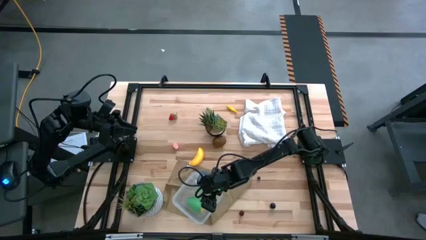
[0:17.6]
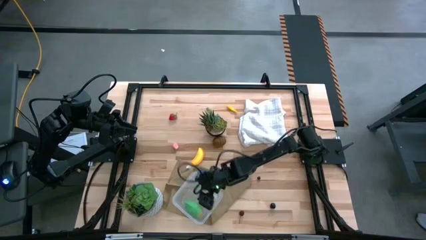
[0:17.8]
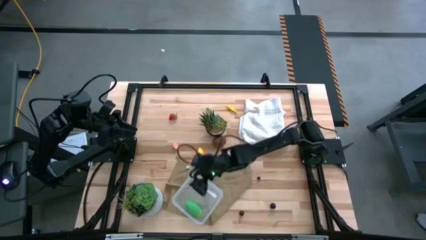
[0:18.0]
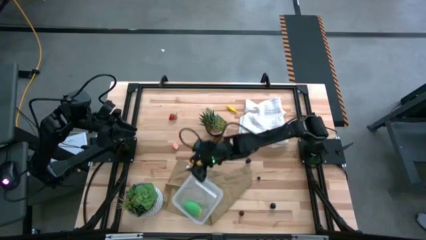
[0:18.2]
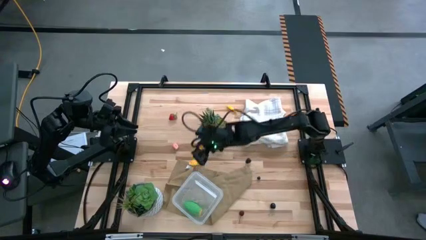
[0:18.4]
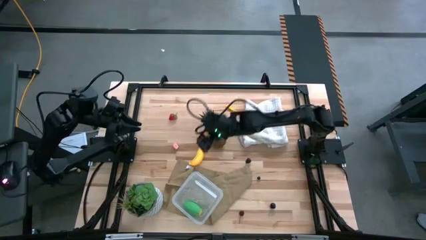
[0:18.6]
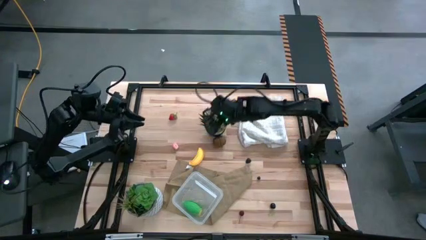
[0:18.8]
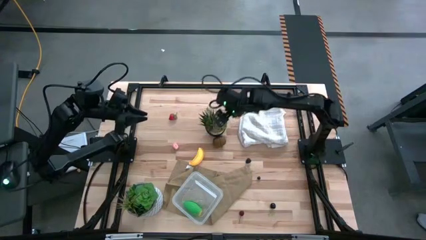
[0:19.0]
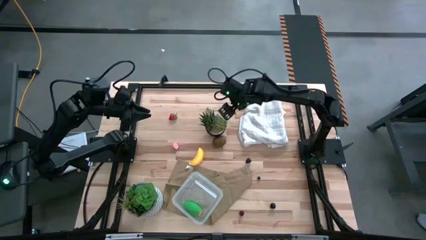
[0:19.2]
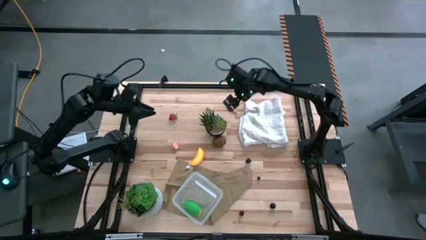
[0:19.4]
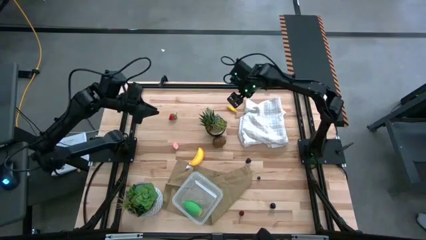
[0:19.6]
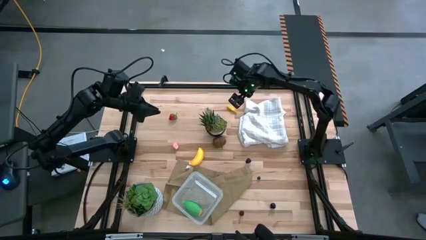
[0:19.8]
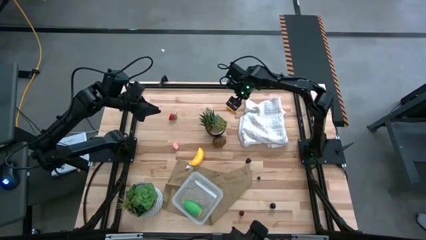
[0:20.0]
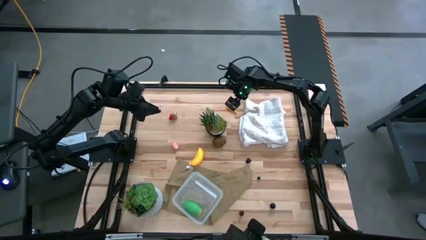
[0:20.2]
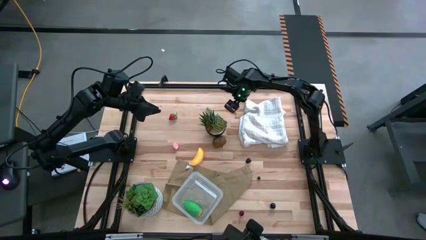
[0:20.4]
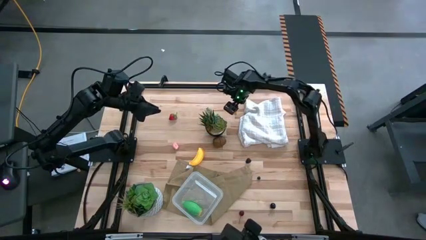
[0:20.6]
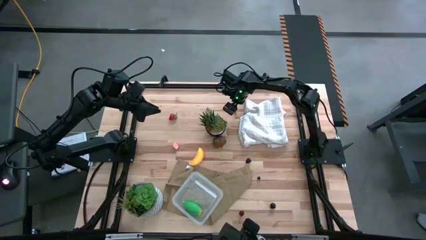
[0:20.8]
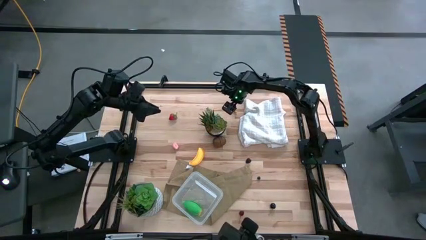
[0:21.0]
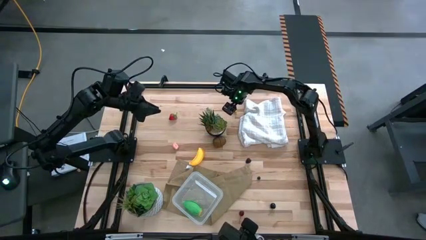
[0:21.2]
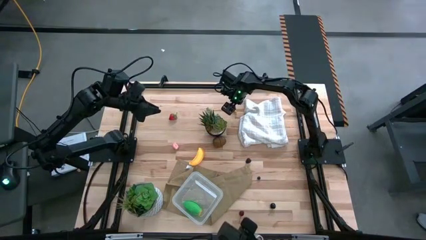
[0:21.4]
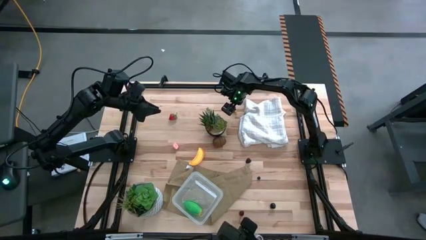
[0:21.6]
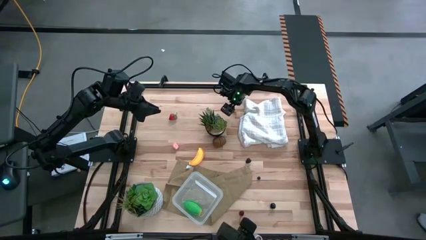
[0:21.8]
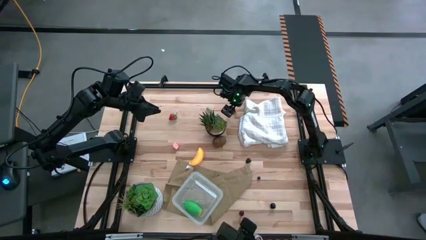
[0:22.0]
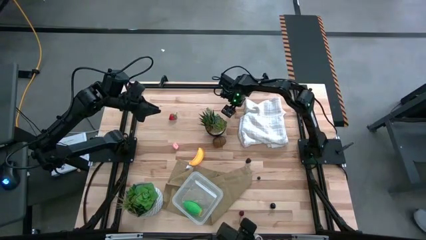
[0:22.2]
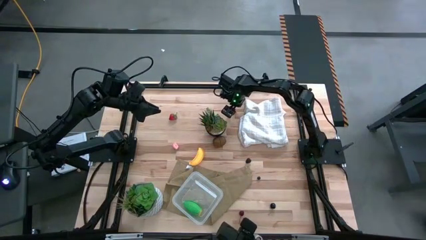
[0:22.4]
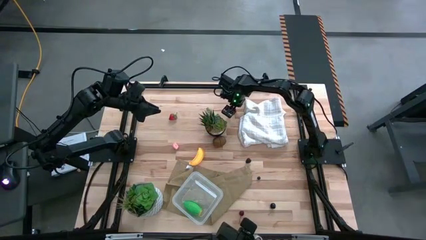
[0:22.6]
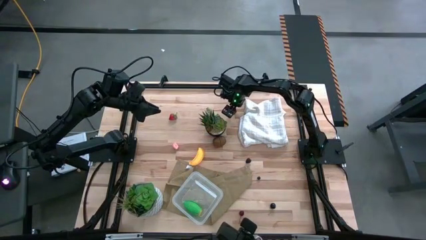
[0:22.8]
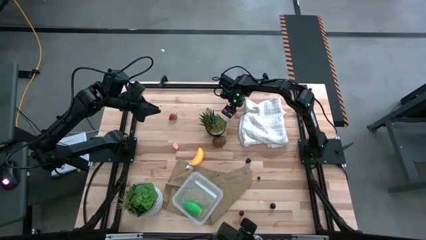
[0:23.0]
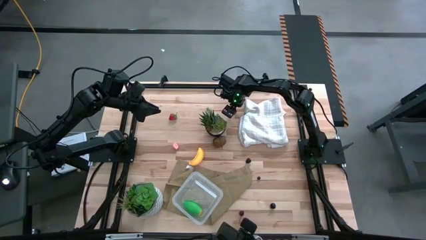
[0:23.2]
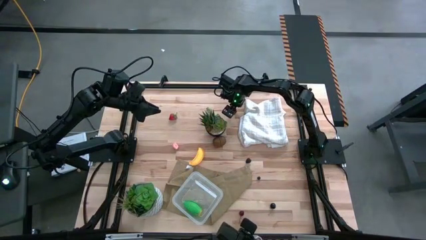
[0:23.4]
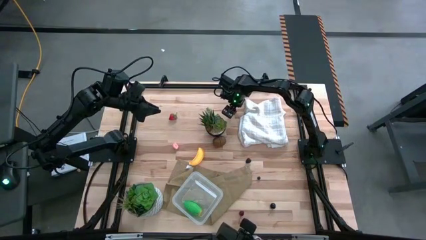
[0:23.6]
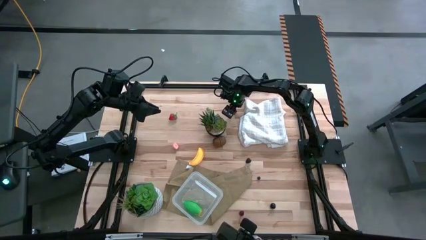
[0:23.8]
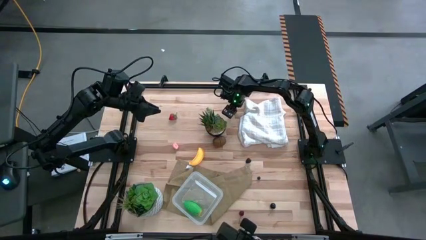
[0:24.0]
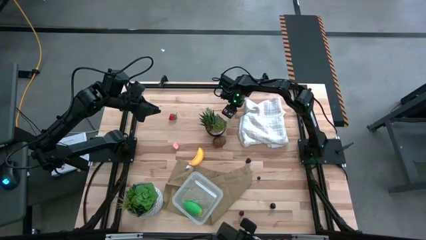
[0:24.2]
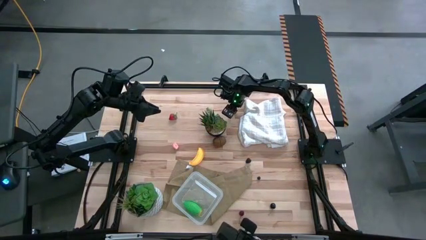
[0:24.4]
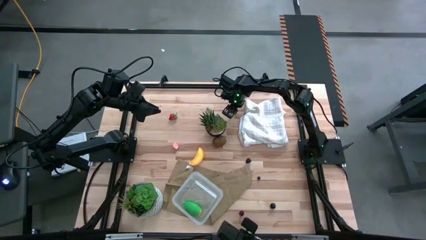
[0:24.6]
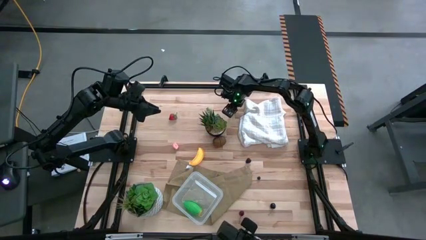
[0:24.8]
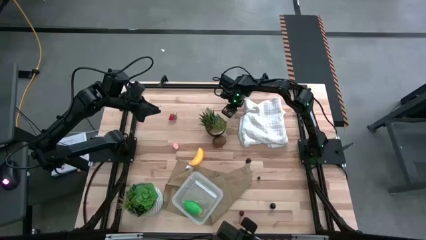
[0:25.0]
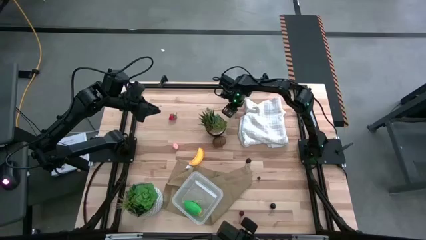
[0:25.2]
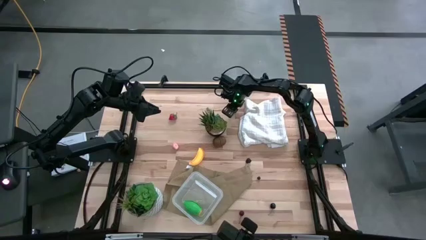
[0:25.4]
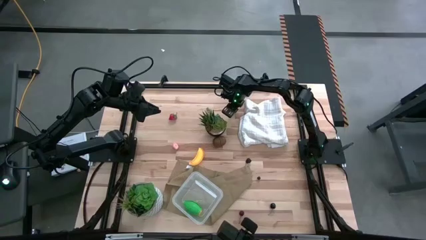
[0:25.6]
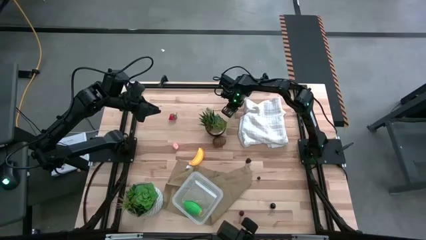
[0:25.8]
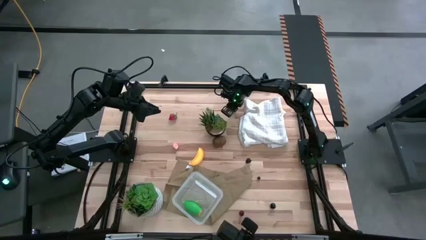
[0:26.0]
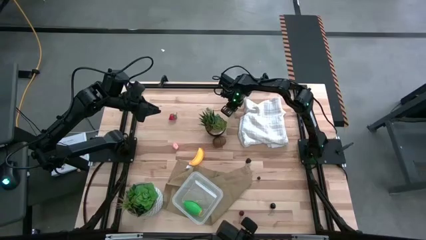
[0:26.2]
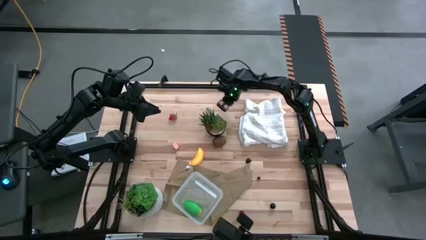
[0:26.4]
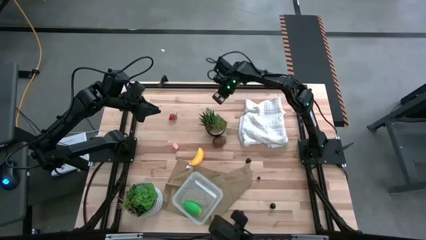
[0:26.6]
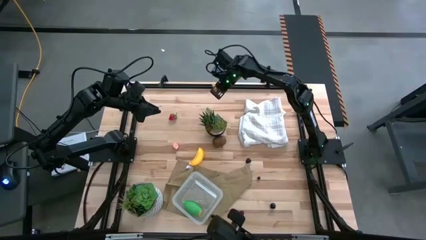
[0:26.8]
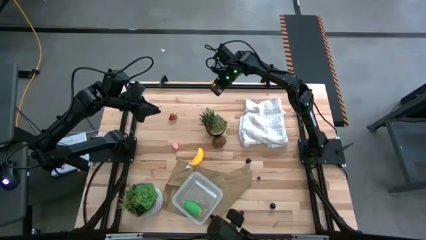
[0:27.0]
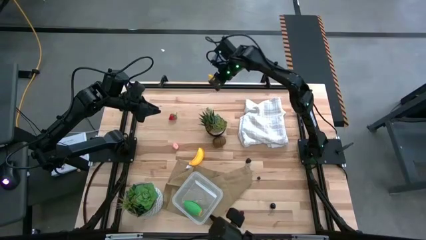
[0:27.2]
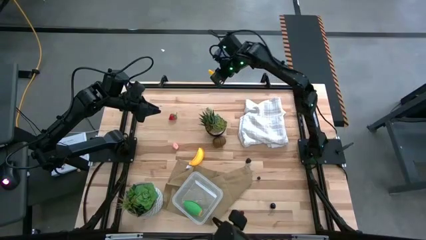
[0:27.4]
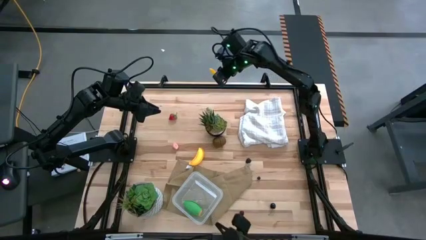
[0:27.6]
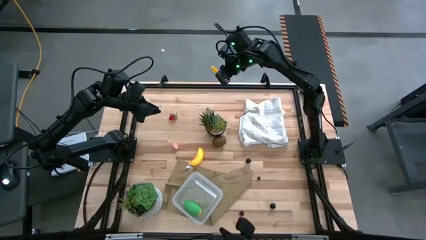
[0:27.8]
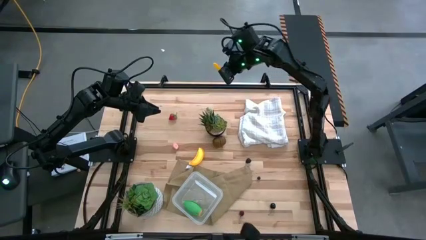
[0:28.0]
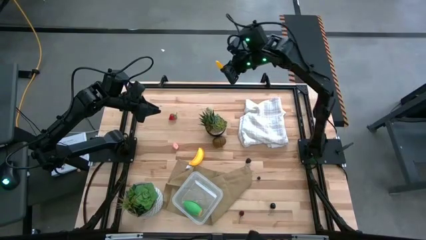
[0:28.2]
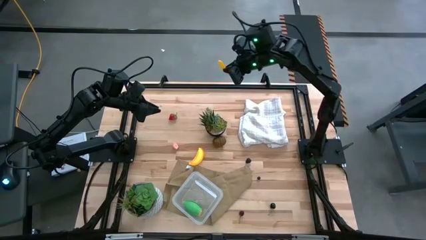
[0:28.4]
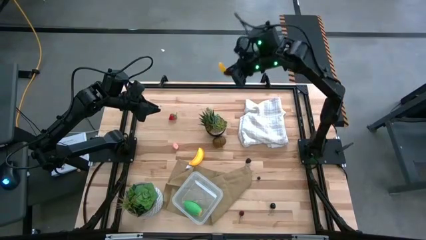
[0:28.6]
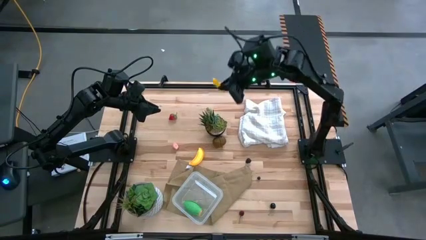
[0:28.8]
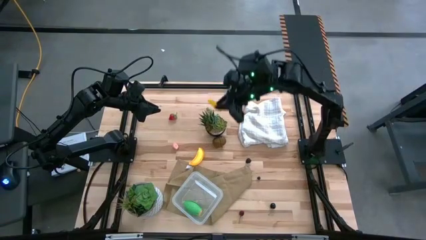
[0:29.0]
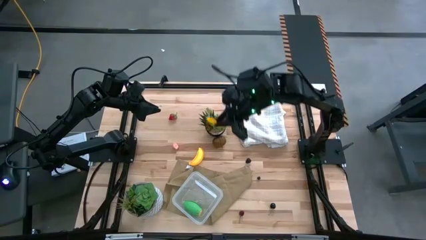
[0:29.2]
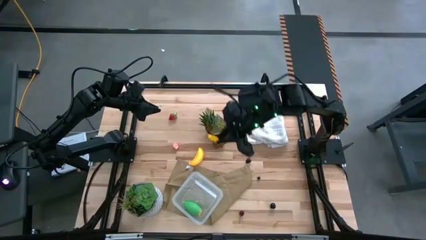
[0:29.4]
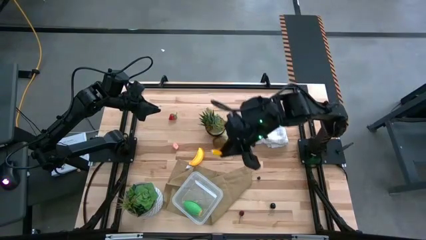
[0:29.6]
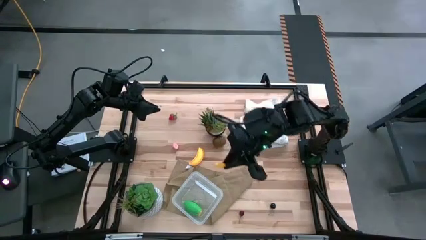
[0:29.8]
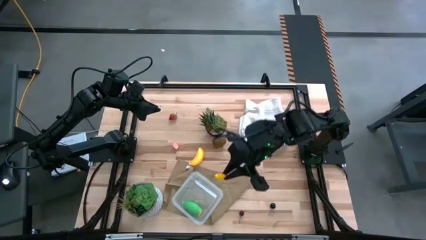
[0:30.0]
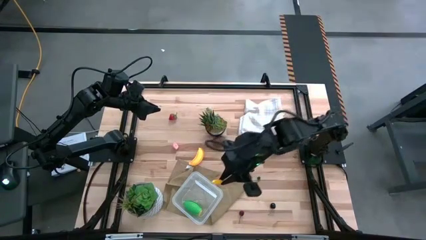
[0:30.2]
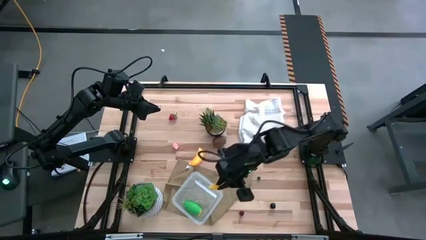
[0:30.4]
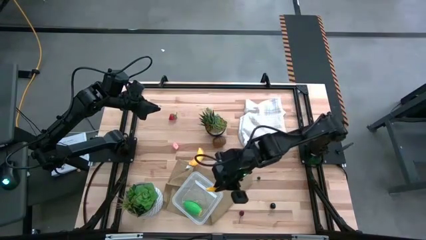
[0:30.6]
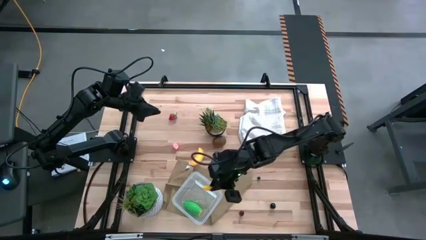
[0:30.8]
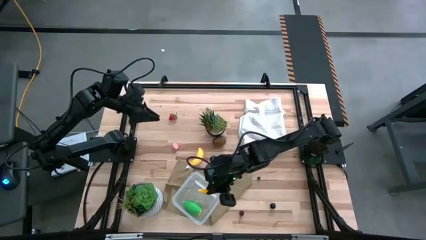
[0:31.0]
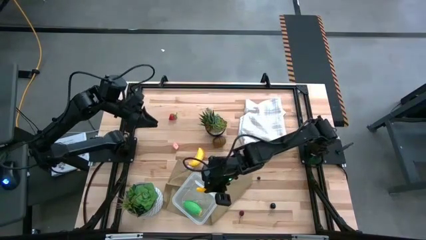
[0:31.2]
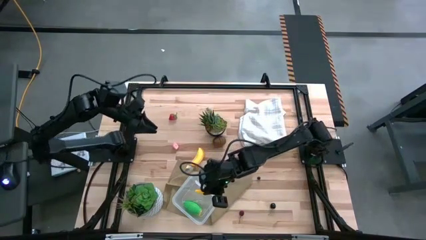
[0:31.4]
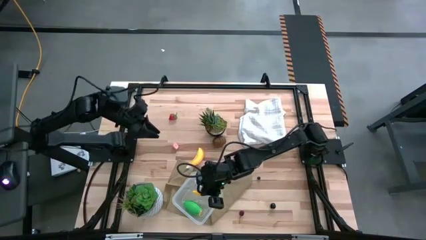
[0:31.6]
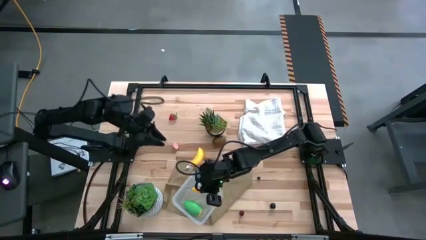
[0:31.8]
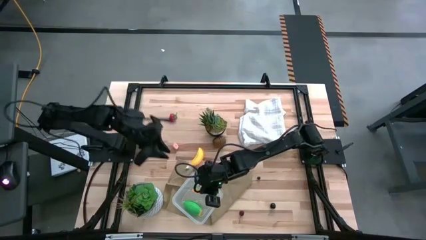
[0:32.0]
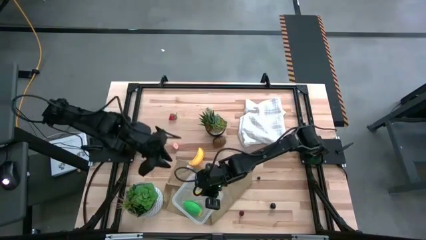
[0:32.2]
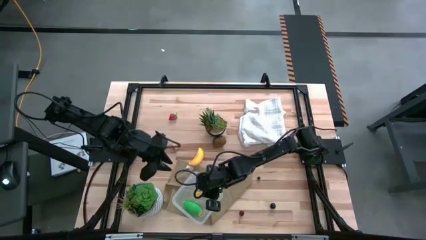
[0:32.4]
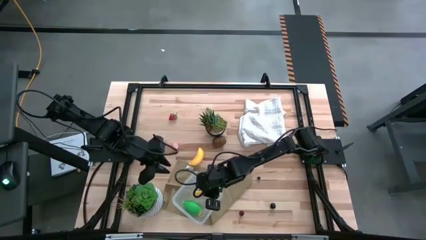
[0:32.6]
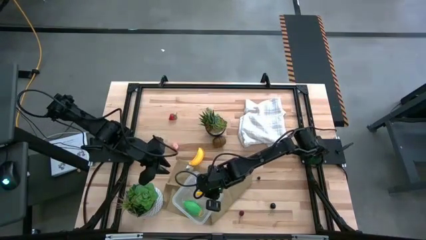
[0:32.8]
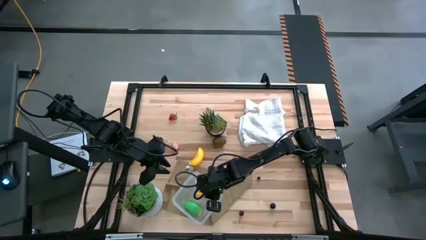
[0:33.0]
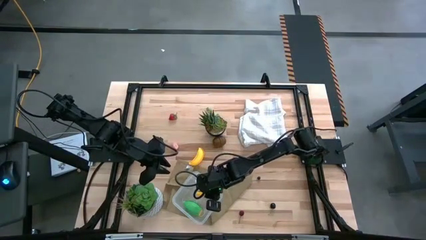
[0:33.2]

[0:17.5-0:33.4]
Task: Pick and placing Produce into tupperware
Put the yellow corn into the container
